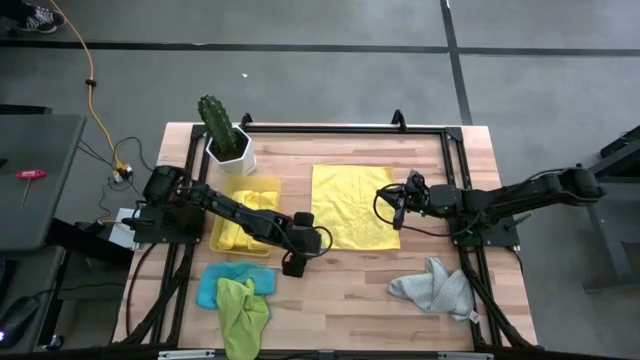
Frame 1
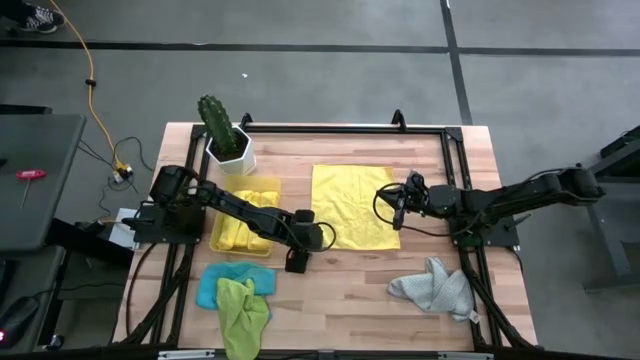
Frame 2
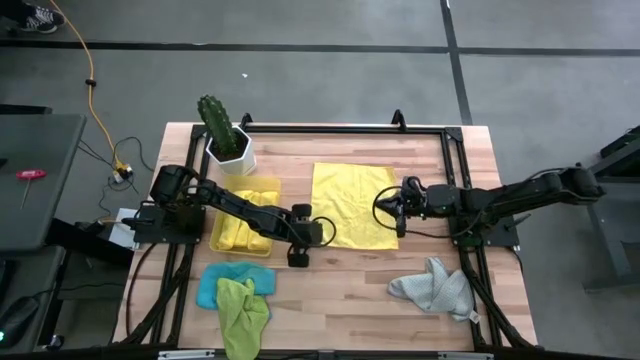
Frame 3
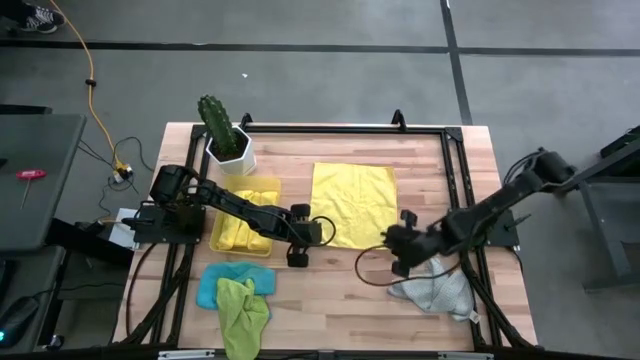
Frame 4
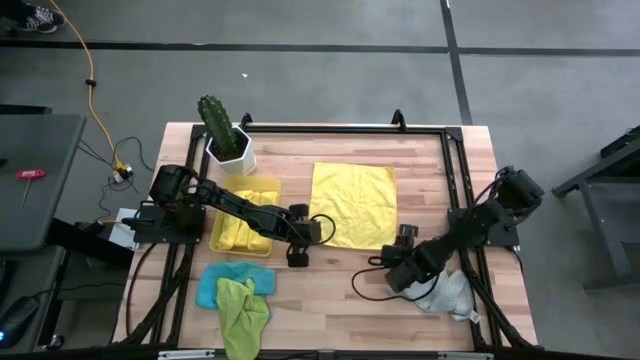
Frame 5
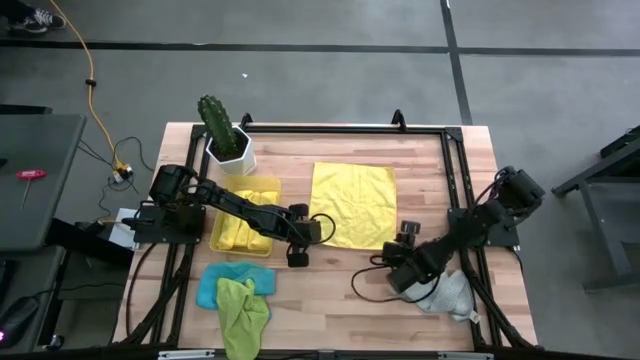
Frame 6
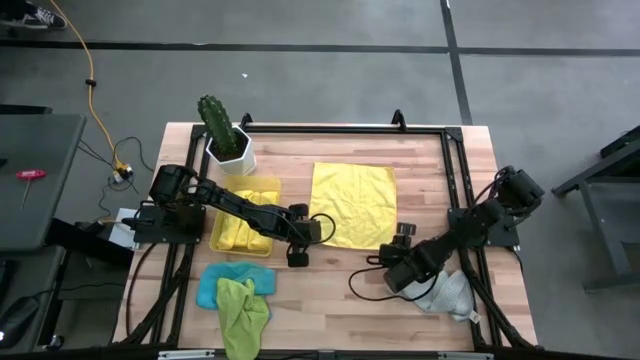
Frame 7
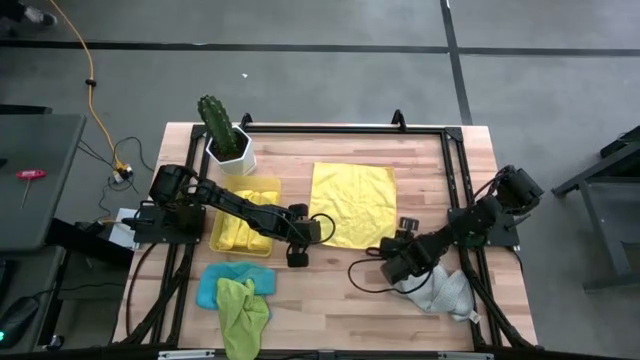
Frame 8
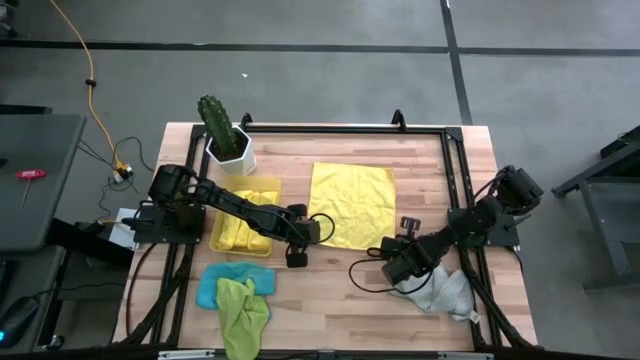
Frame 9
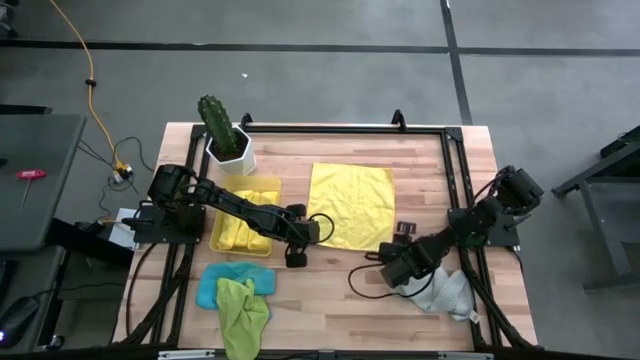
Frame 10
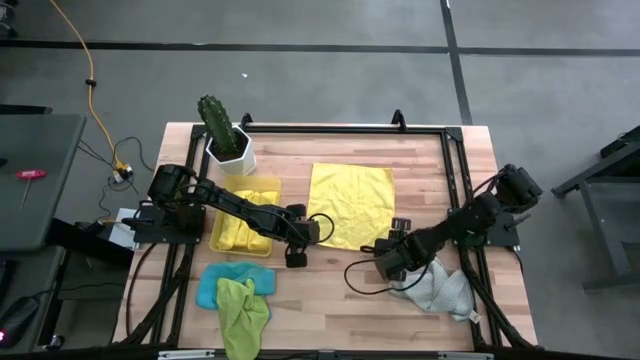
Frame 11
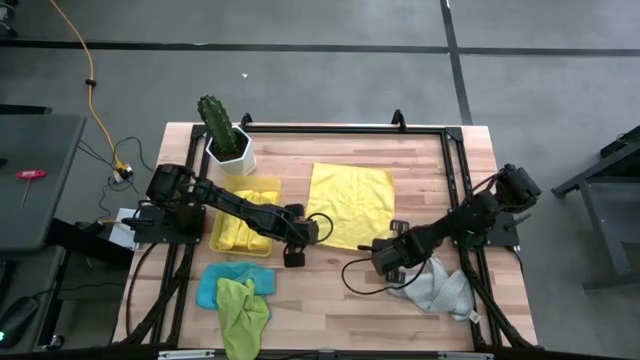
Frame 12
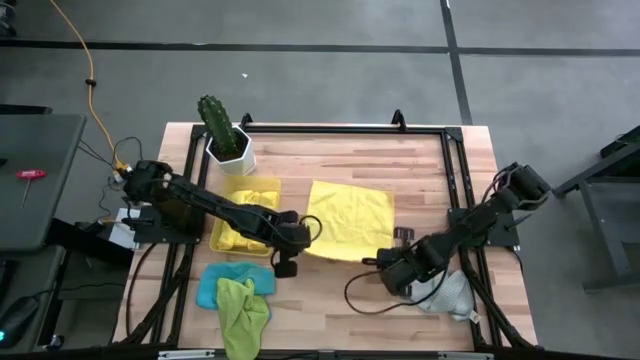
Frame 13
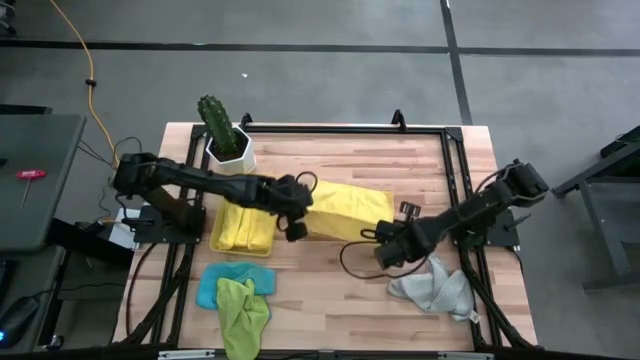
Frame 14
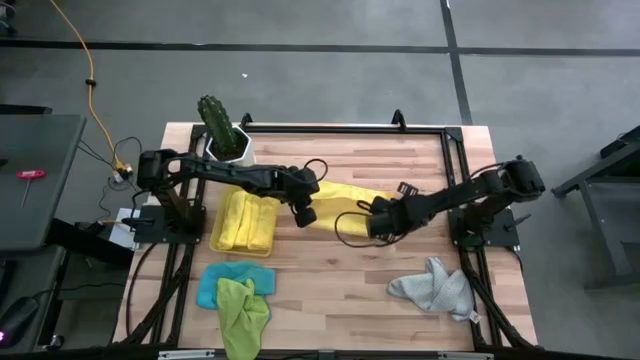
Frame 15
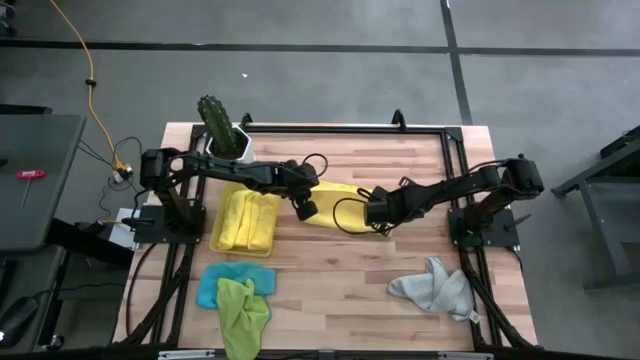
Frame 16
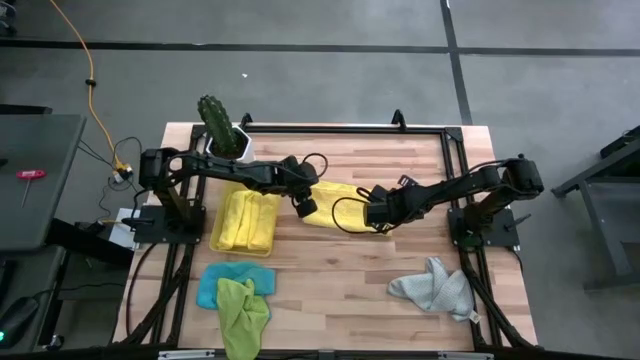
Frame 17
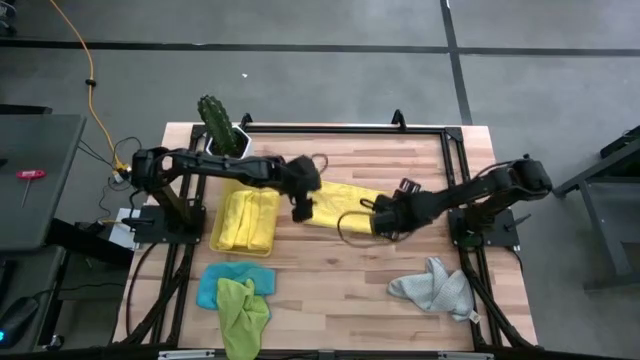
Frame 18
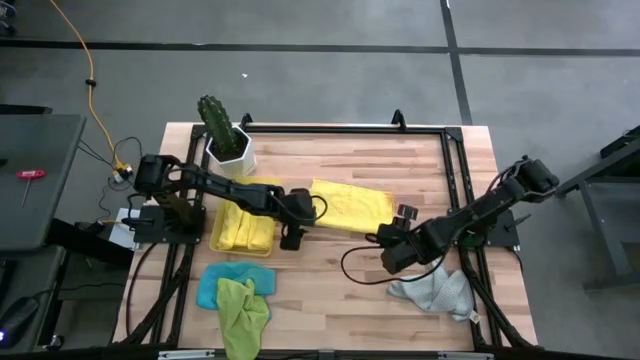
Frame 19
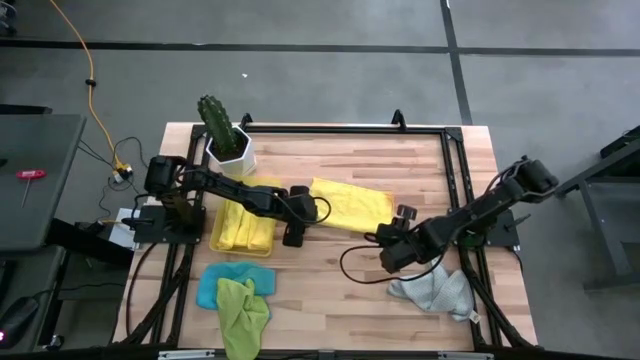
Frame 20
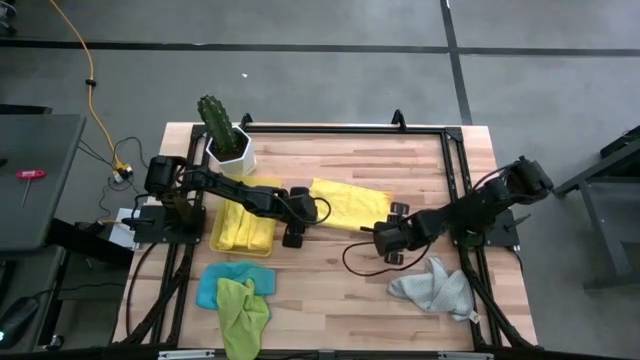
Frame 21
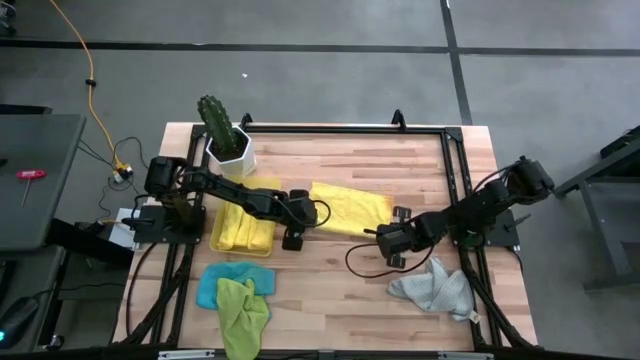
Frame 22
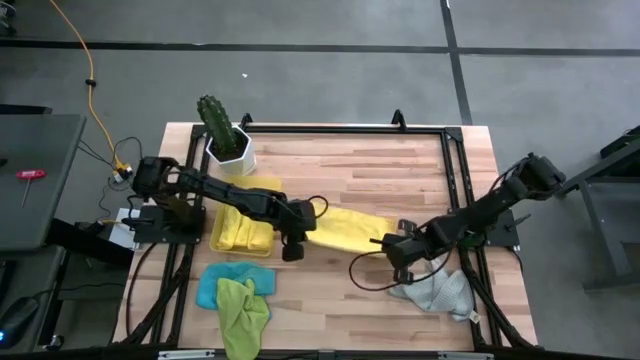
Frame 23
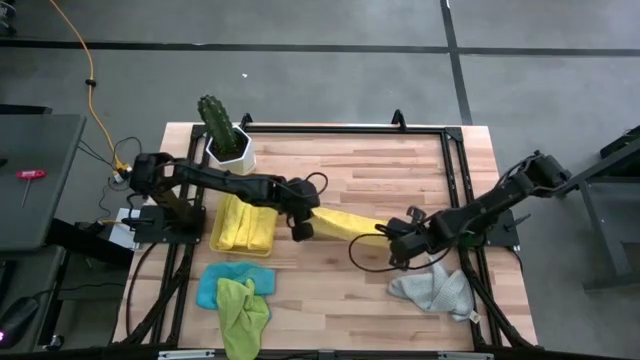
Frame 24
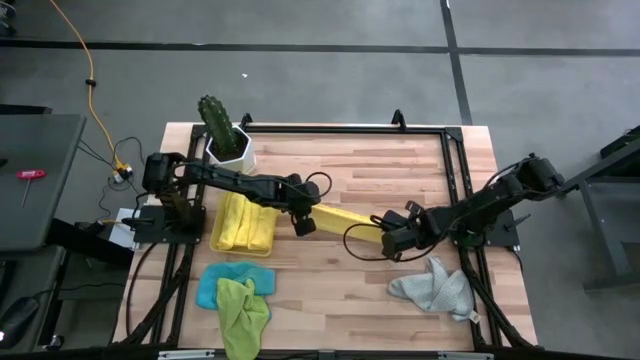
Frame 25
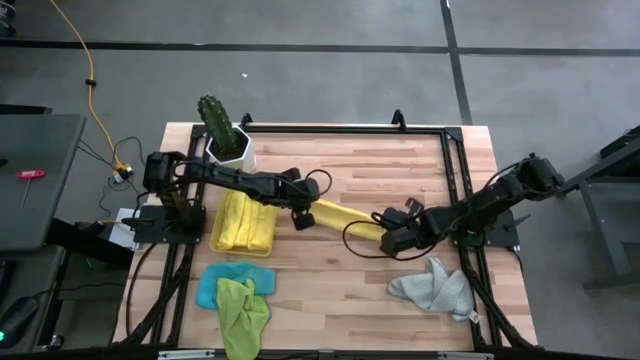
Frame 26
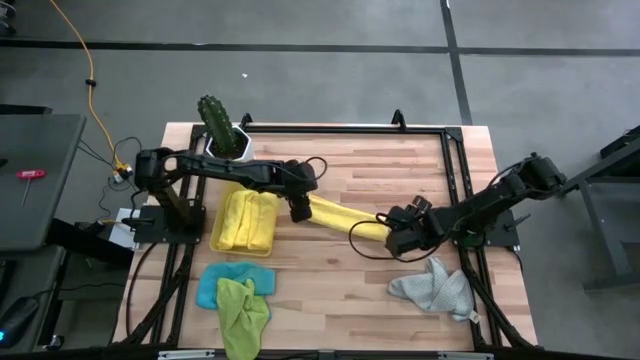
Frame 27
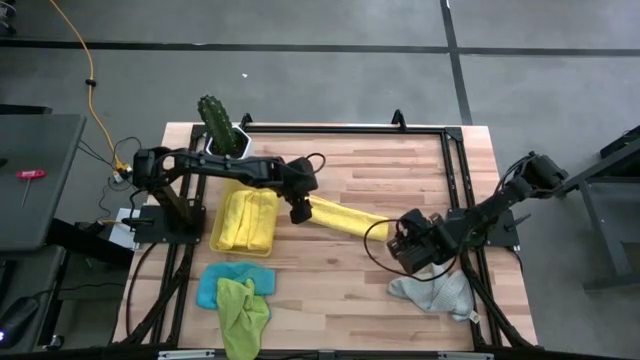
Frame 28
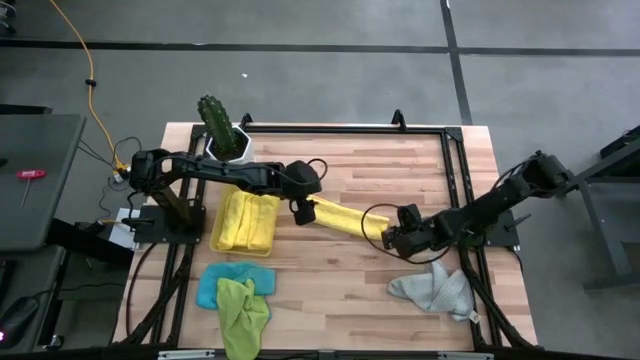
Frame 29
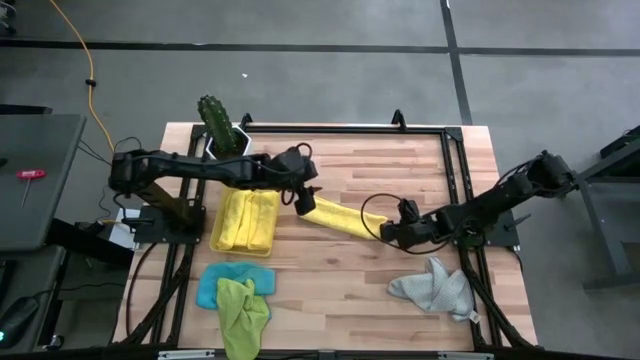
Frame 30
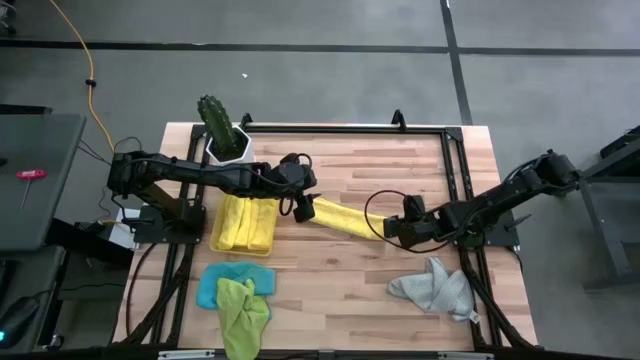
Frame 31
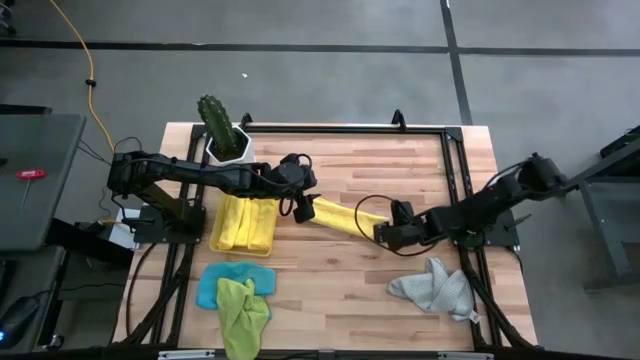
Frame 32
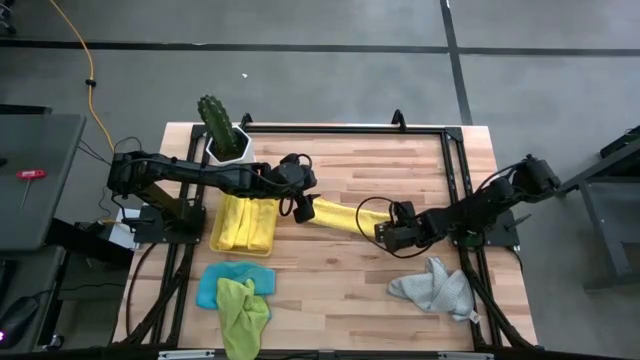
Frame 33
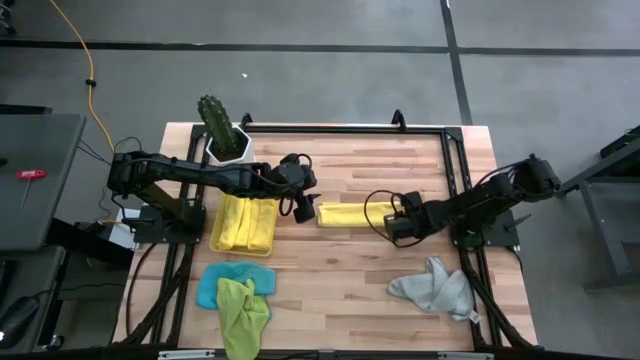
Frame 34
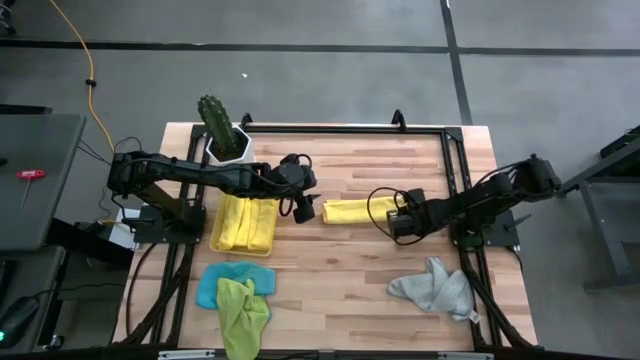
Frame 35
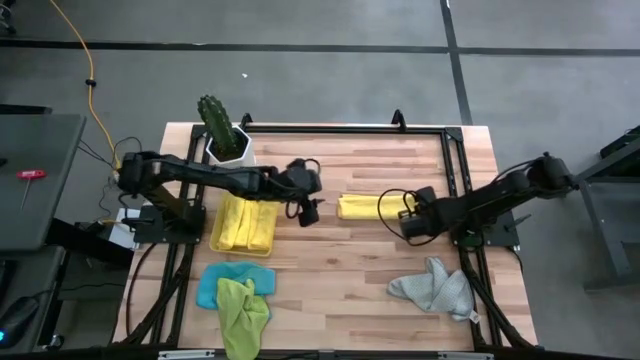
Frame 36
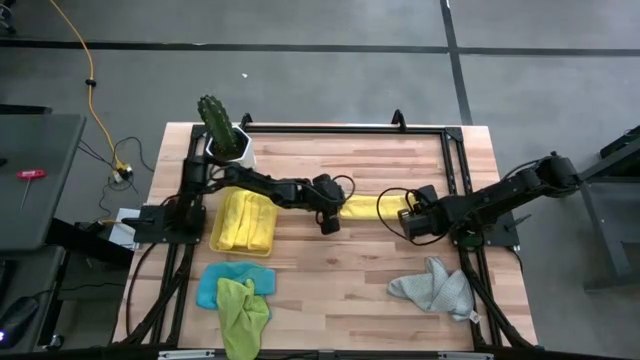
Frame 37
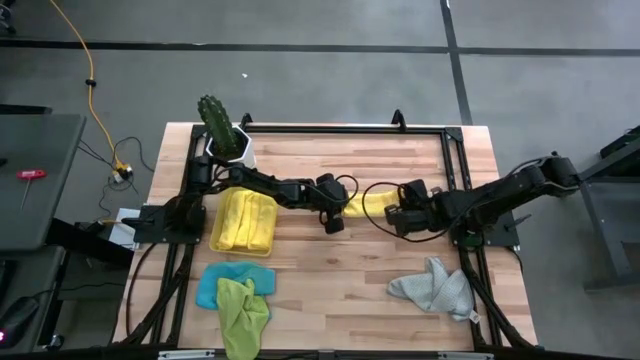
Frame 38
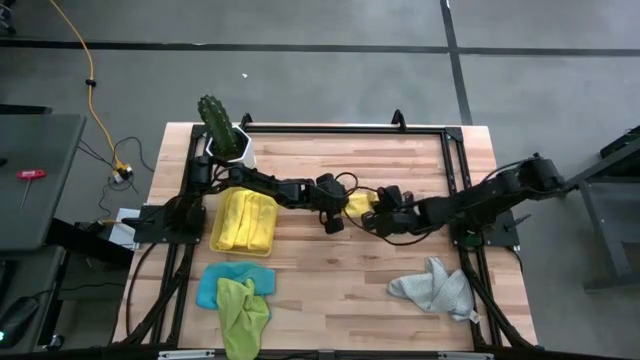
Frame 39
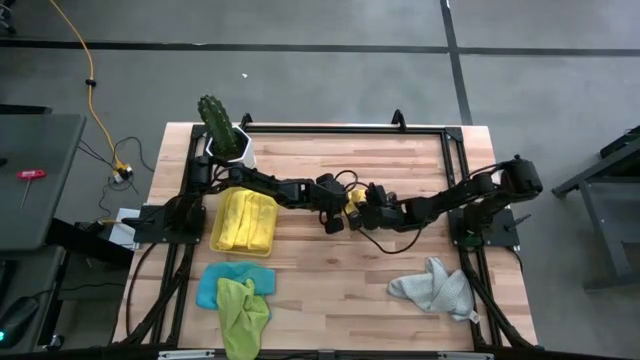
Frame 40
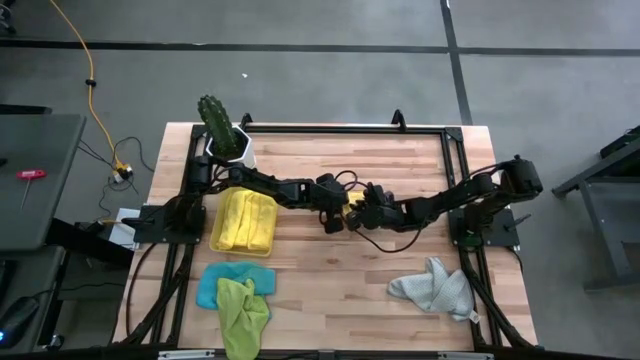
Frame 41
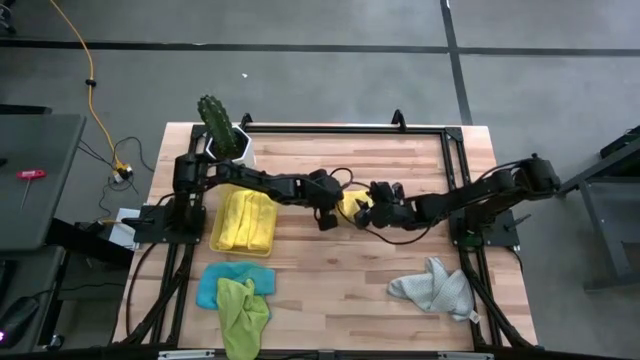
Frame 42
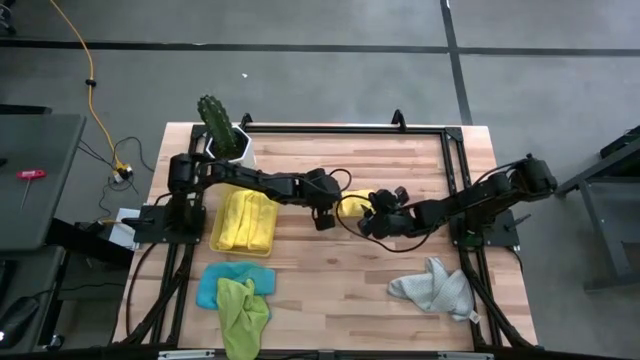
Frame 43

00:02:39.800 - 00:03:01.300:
Task: Fold microfiber towels
Fold the yellow microfiber towel
